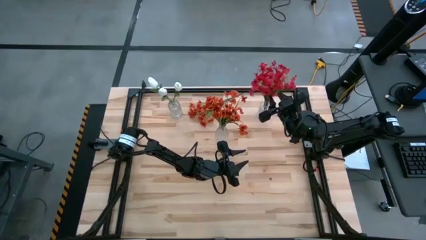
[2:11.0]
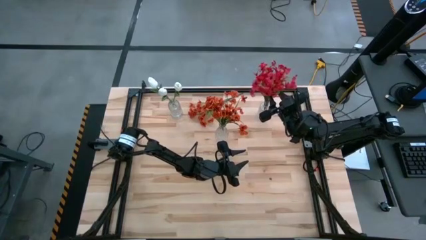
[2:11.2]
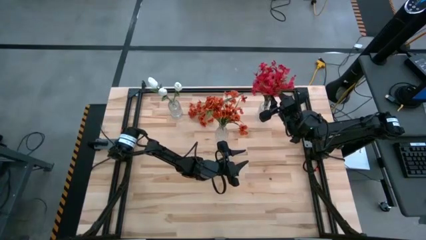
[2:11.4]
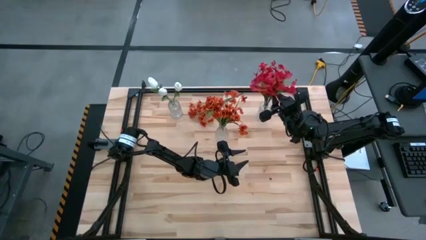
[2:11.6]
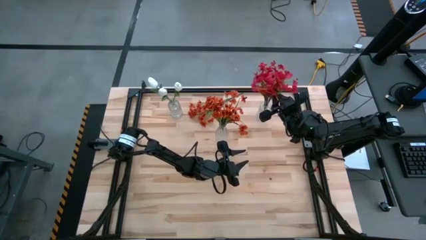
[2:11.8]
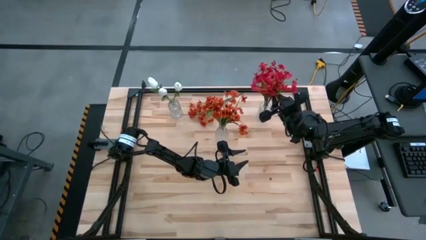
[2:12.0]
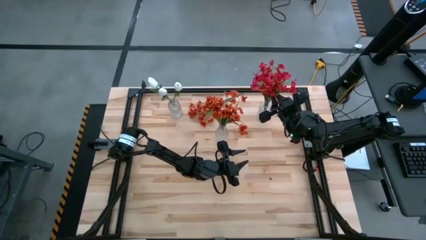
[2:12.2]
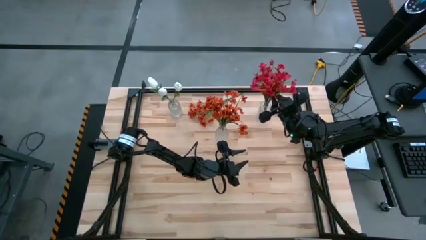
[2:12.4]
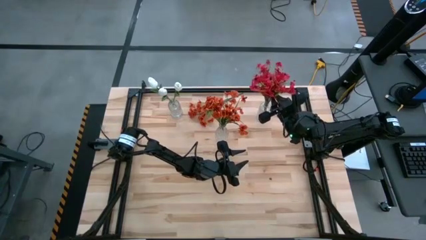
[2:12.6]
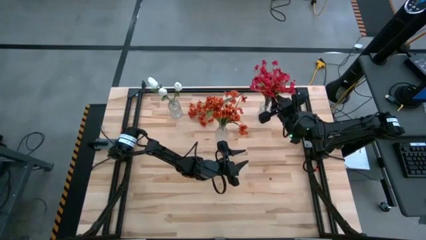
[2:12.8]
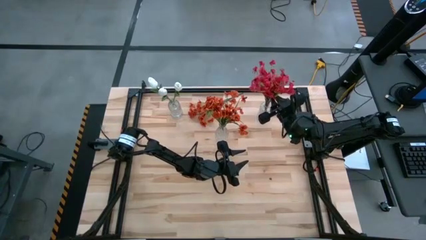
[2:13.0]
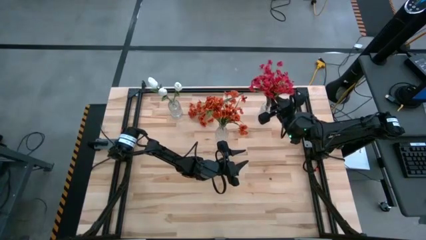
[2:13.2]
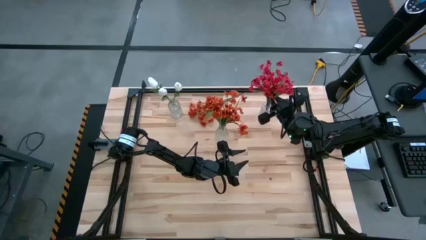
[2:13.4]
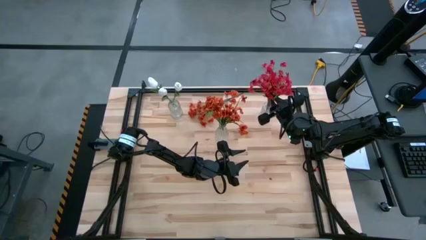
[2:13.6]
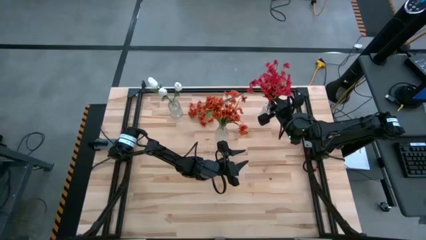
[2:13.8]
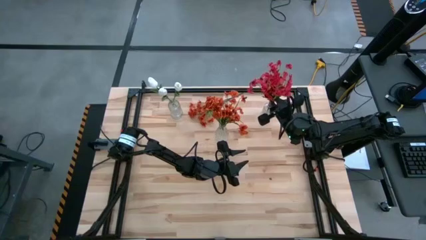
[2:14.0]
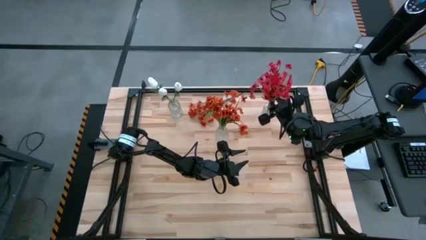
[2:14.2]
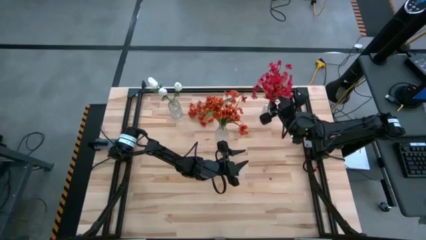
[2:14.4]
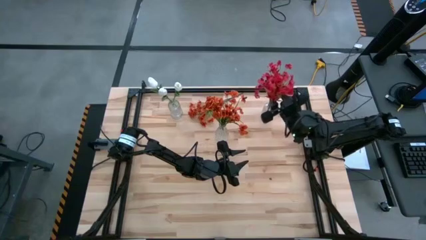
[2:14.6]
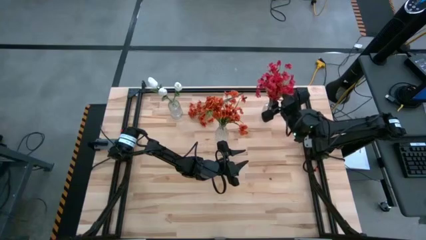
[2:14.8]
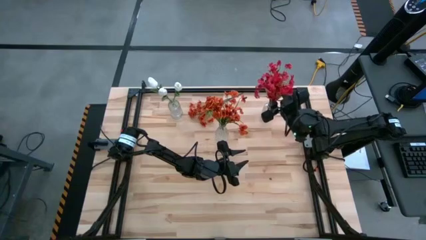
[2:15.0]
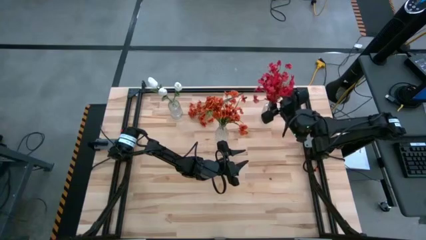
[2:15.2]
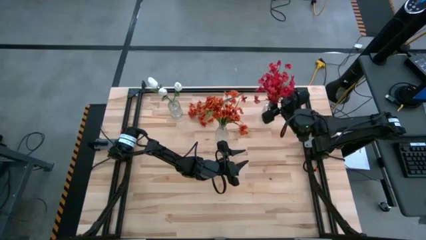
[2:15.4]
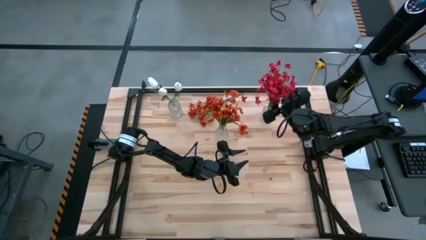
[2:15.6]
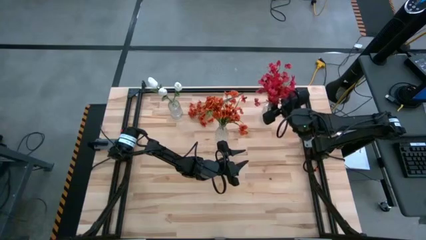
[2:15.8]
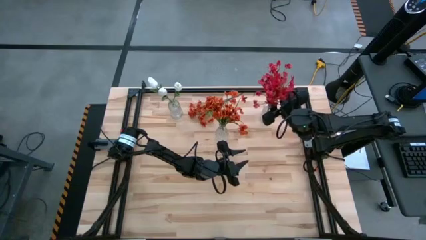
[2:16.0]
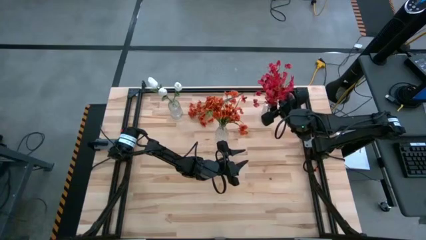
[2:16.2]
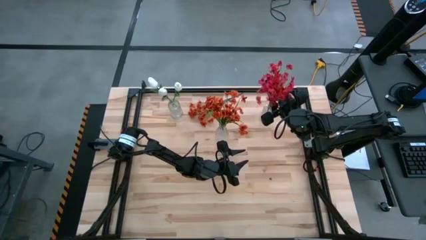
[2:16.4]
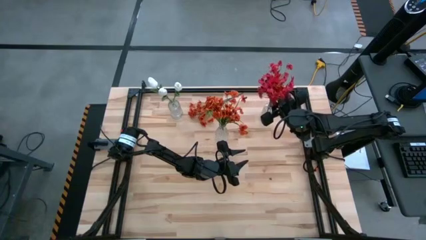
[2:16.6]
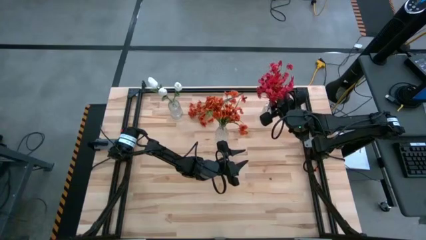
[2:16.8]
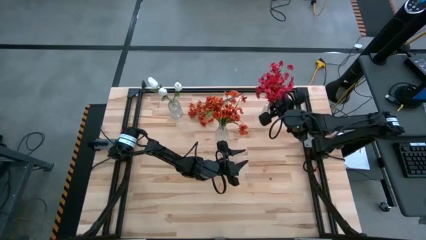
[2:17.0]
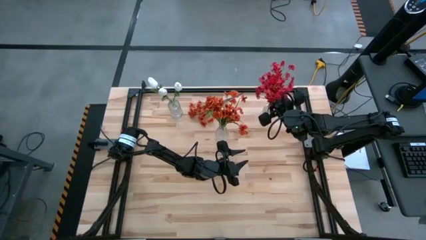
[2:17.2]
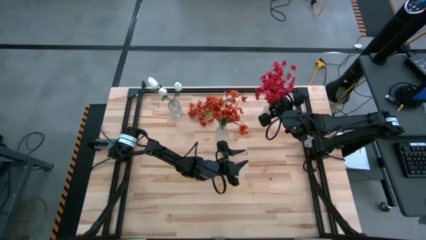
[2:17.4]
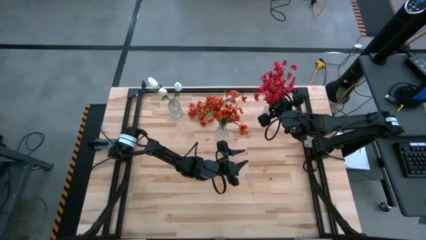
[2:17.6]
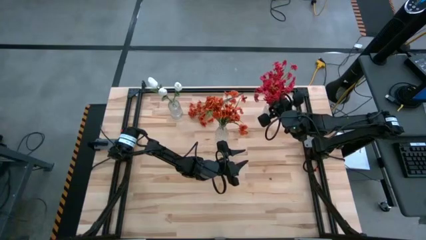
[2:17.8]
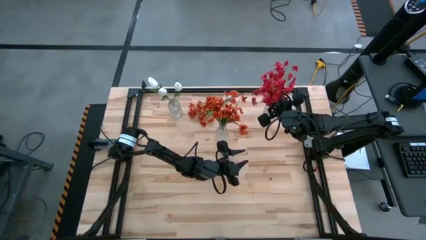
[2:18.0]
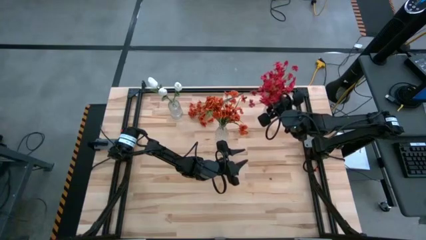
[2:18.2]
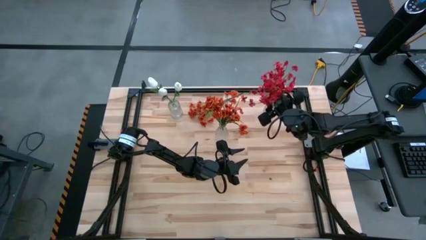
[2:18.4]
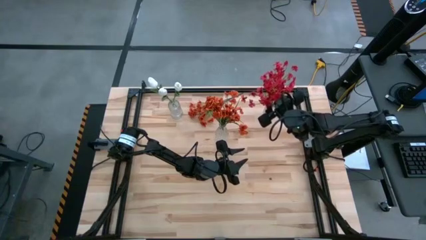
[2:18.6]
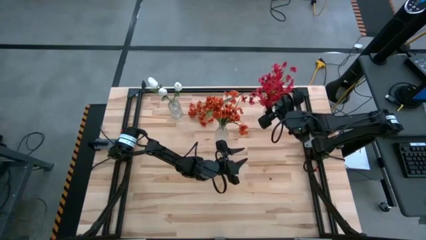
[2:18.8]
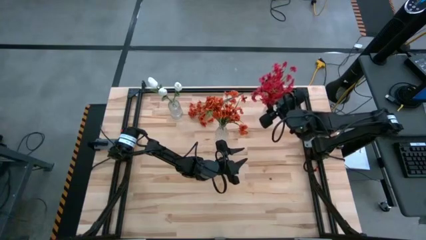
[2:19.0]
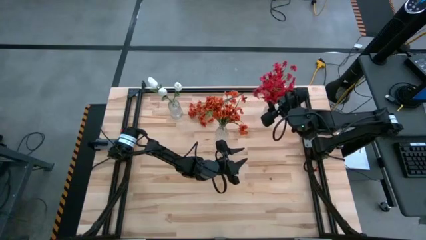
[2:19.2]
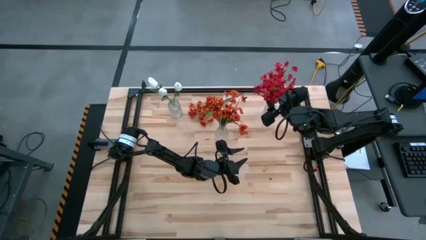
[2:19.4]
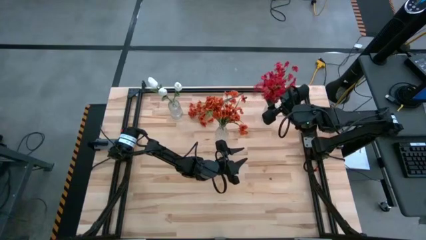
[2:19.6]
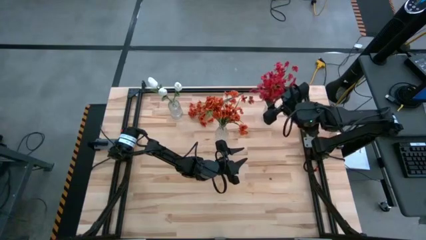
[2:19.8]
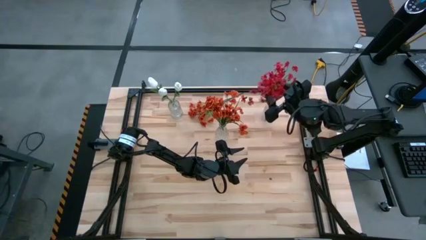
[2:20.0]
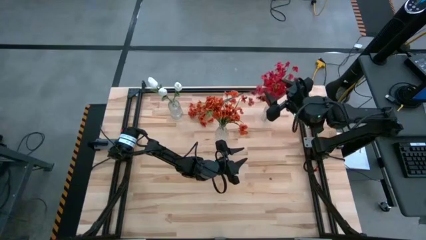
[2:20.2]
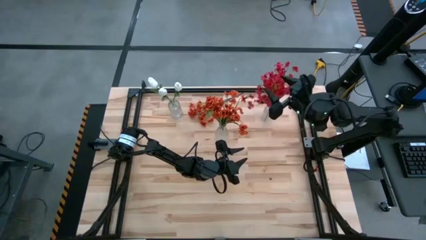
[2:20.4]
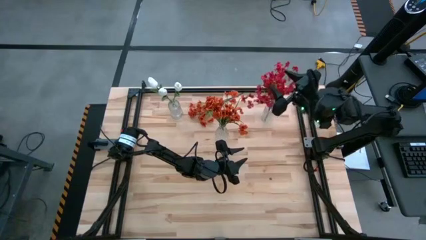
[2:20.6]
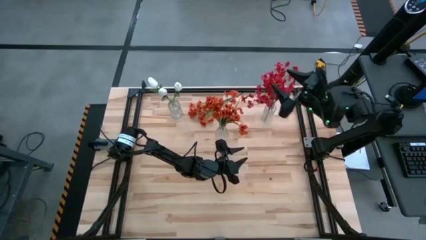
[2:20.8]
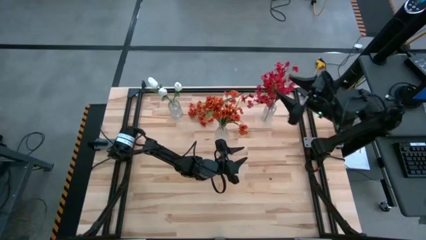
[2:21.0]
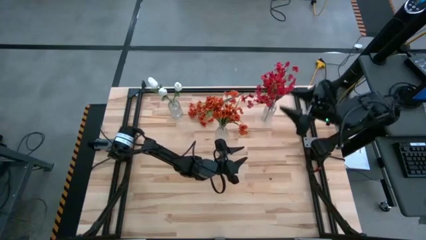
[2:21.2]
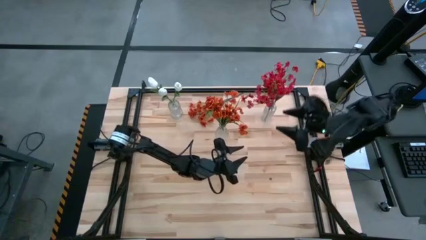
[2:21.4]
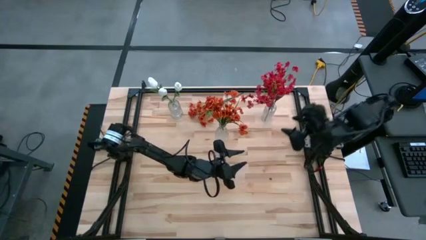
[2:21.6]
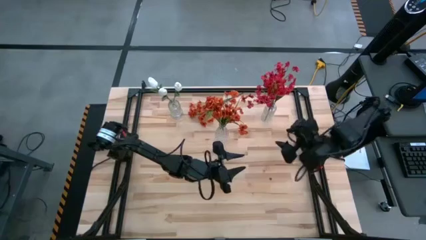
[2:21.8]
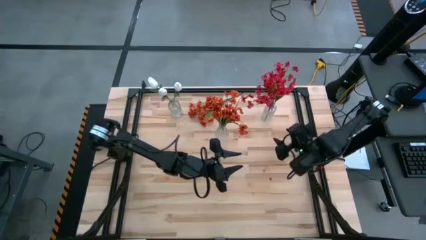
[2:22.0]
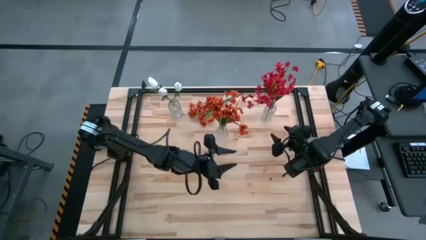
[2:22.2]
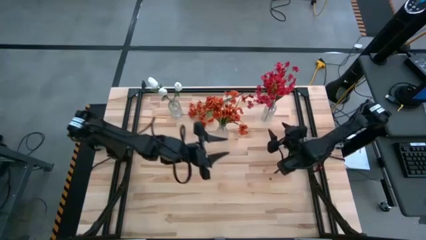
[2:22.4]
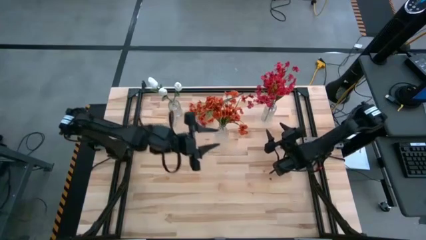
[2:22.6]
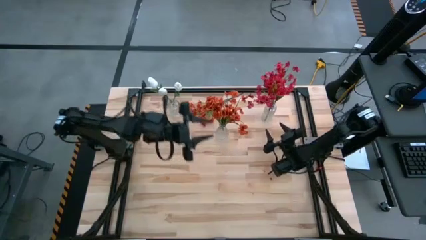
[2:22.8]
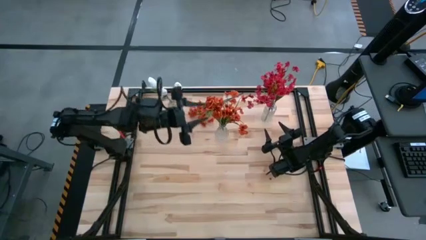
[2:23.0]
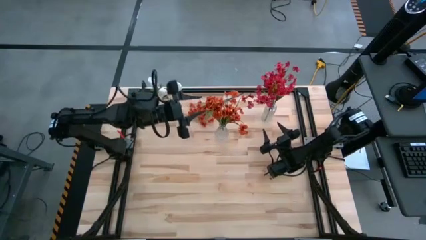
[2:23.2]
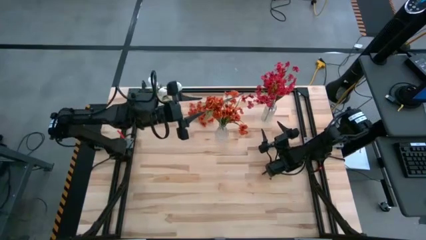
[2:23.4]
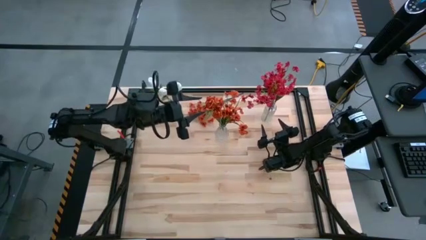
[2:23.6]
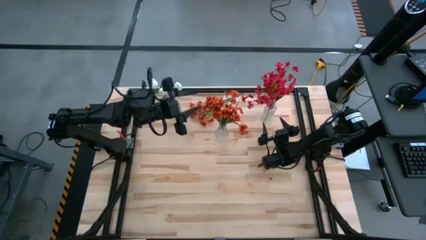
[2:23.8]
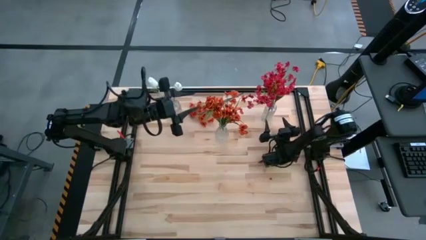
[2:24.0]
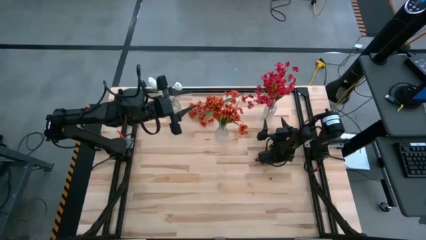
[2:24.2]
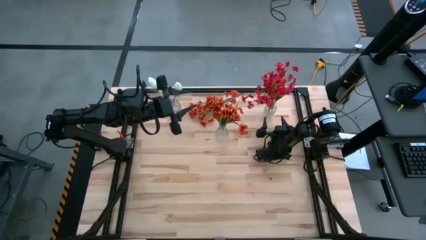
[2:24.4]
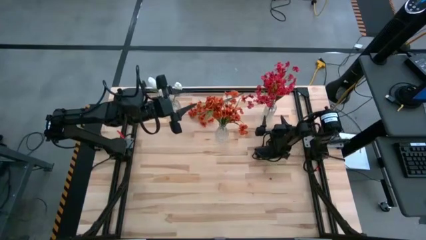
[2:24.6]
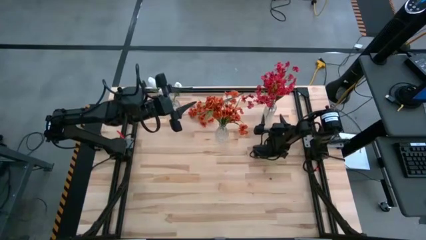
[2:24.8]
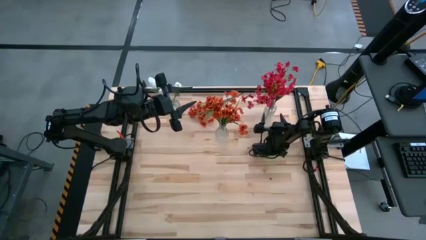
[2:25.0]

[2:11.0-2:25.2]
Task: Sort flowers into vase by color
Put the red flowers into the top right transparent vase

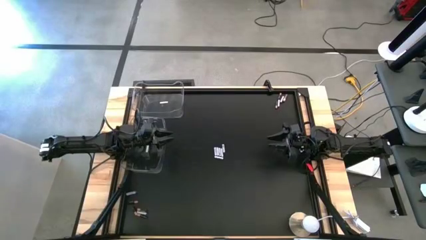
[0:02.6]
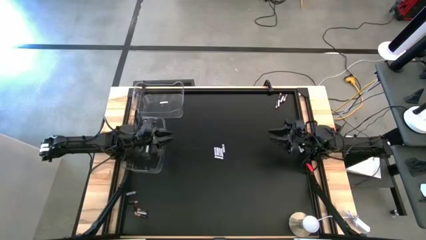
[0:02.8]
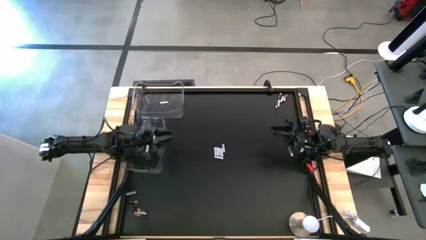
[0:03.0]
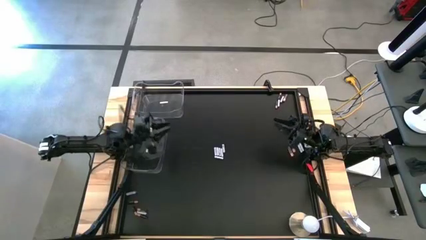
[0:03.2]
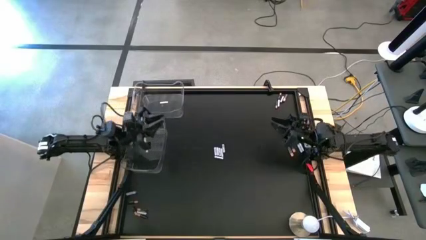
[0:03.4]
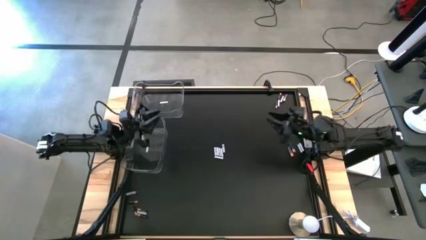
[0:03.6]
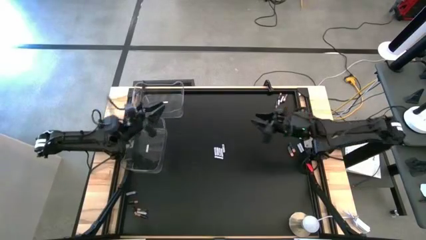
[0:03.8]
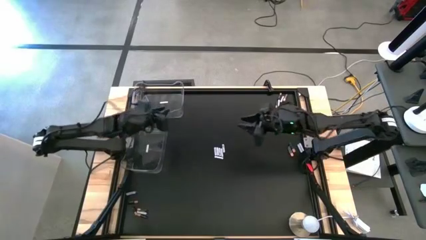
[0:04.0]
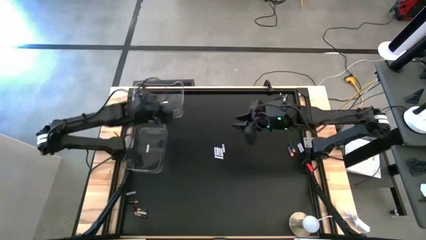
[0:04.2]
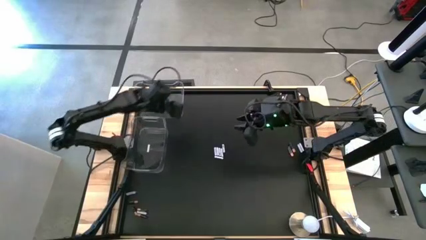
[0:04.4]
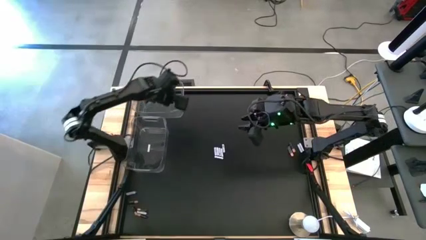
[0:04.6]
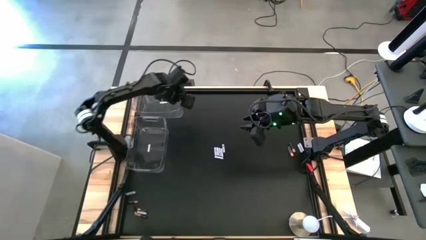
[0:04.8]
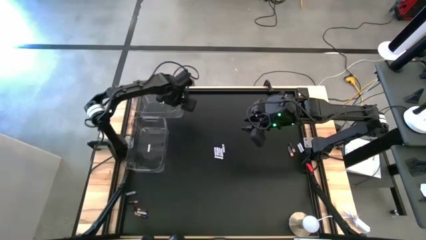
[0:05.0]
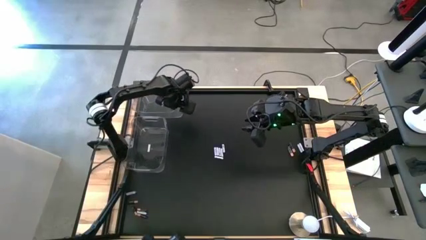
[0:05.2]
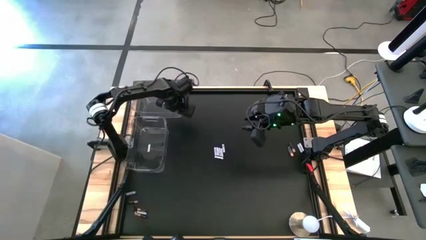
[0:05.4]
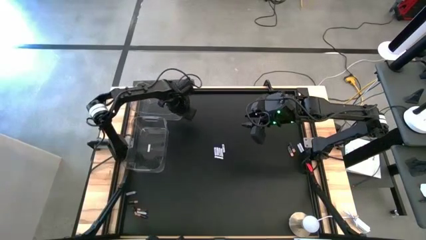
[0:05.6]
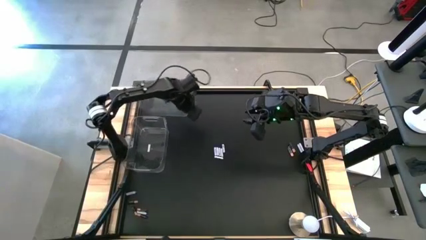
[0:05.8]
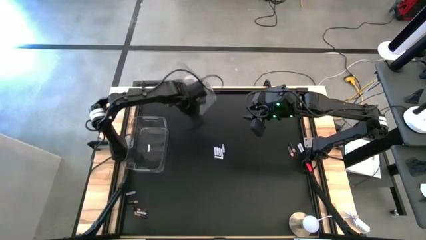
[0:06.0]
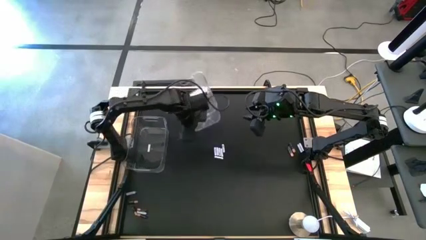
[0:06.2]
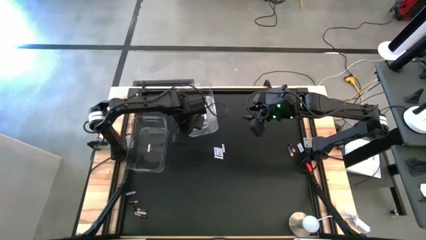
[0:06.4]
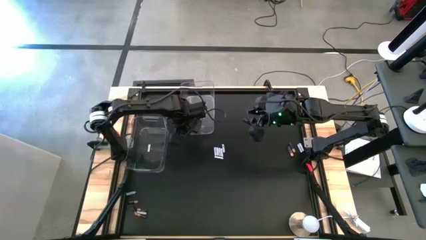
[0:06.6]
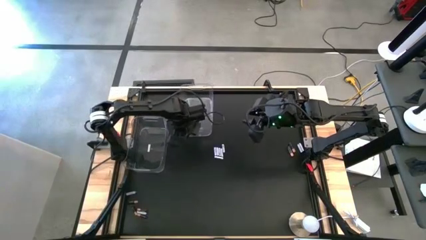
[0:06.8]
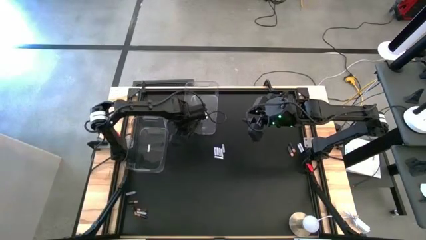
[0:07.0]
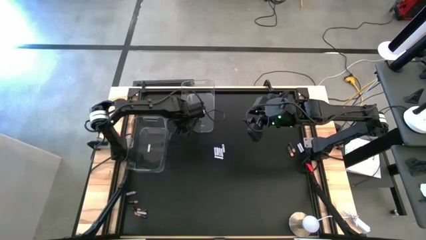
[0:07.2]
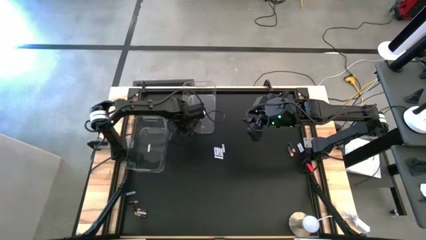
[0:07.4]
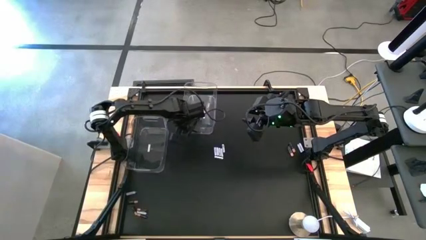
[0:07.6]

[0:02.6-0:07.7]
Task: Sort batteries
Move the transparent bin to the top middle left
